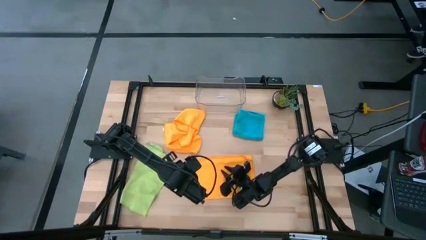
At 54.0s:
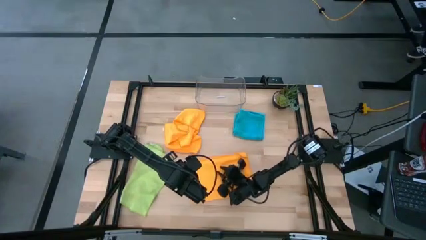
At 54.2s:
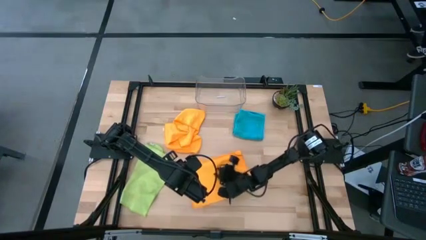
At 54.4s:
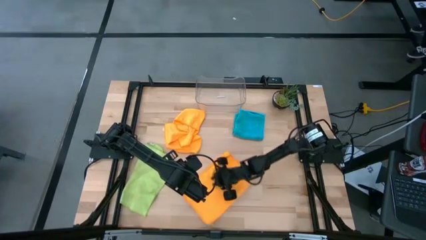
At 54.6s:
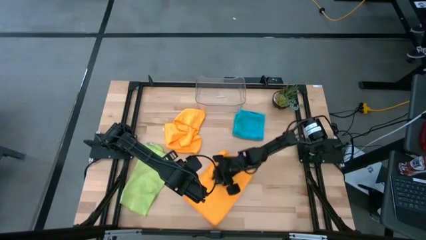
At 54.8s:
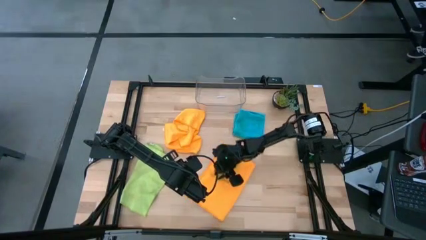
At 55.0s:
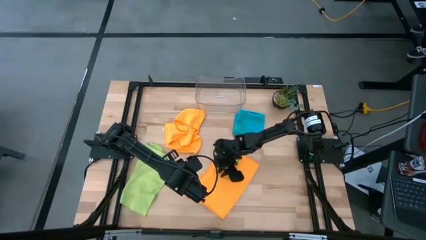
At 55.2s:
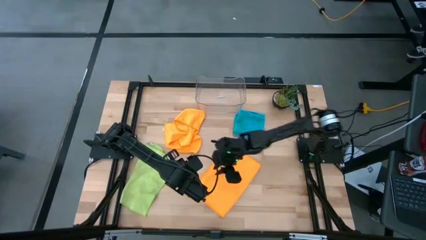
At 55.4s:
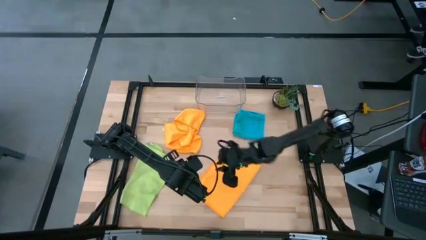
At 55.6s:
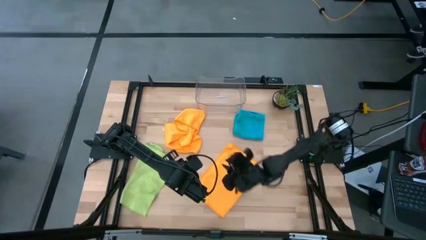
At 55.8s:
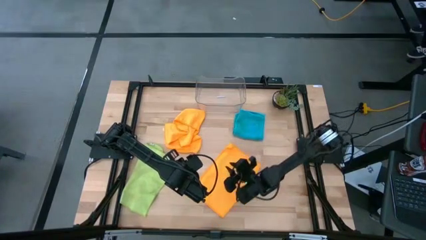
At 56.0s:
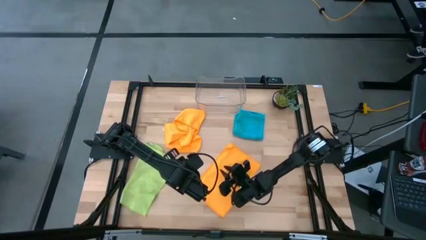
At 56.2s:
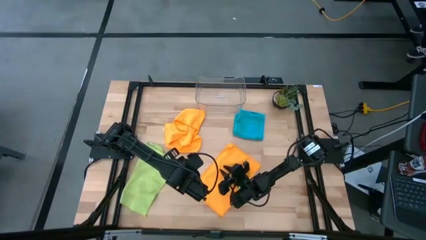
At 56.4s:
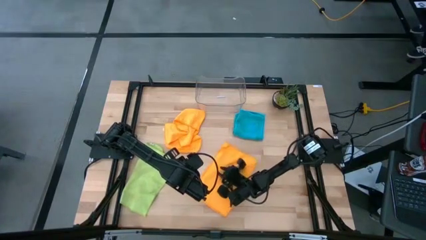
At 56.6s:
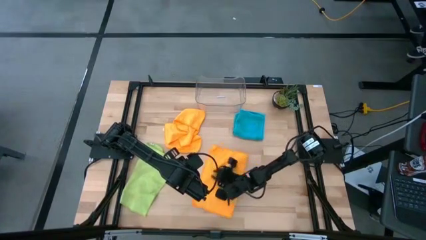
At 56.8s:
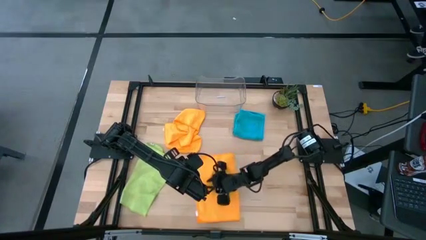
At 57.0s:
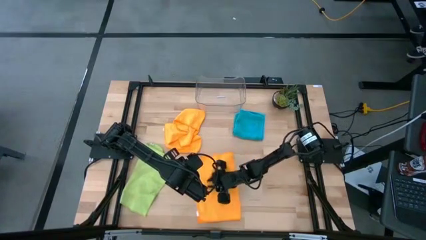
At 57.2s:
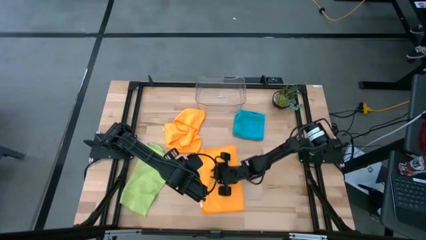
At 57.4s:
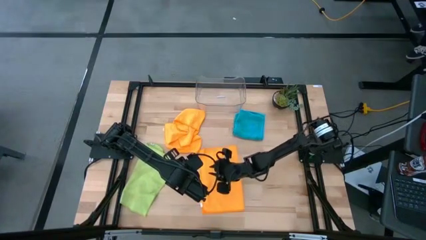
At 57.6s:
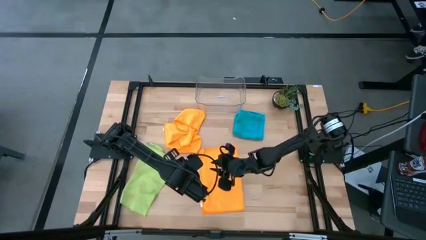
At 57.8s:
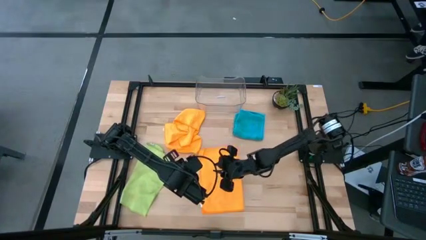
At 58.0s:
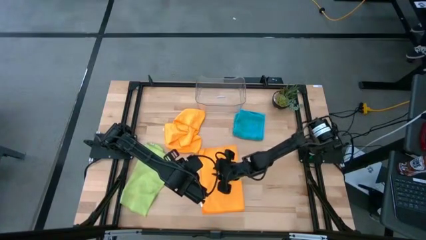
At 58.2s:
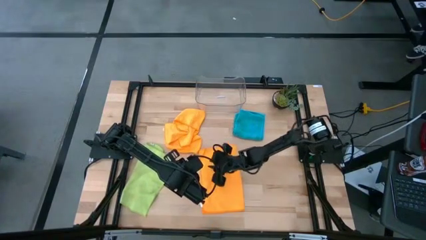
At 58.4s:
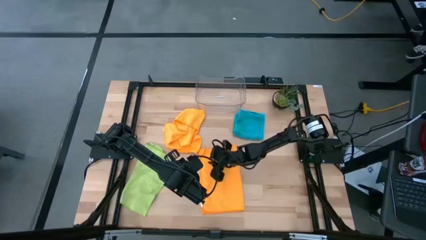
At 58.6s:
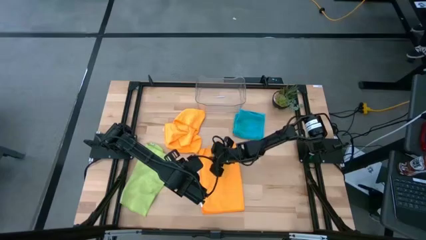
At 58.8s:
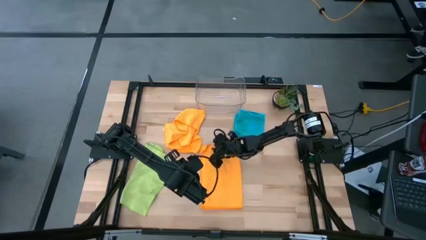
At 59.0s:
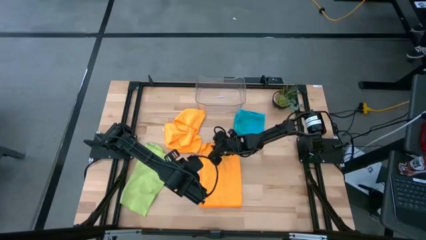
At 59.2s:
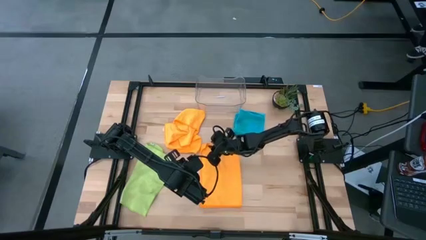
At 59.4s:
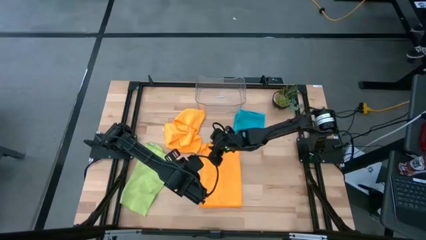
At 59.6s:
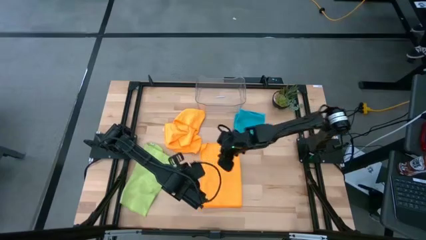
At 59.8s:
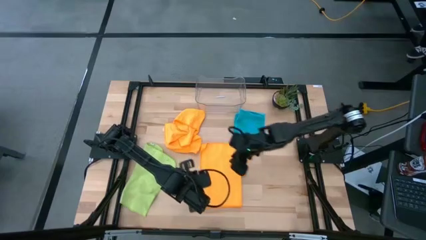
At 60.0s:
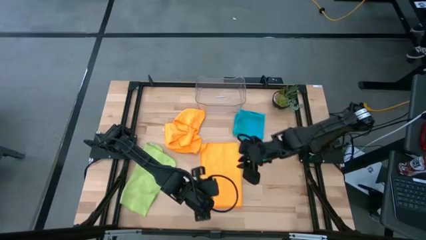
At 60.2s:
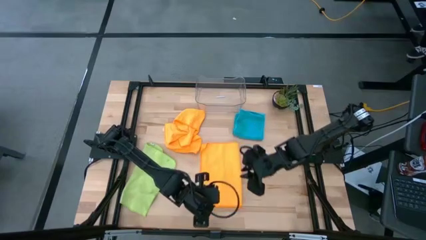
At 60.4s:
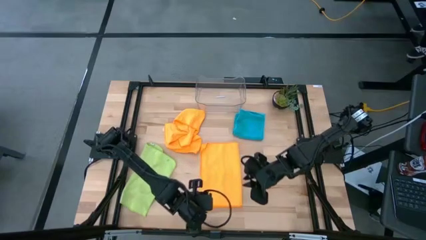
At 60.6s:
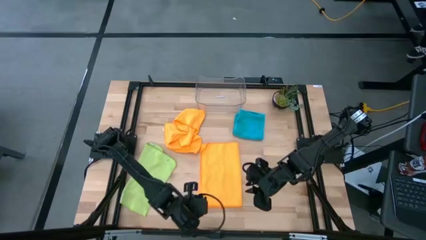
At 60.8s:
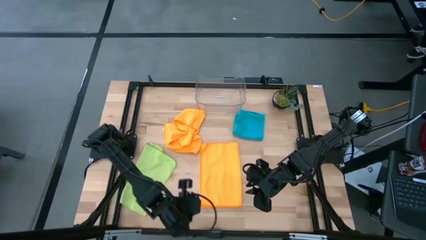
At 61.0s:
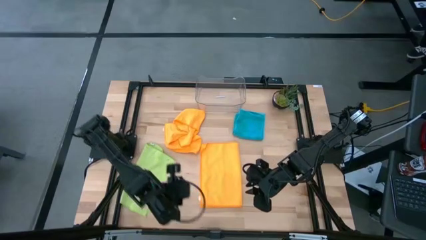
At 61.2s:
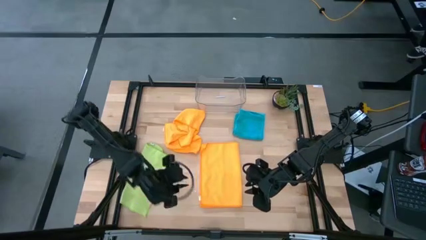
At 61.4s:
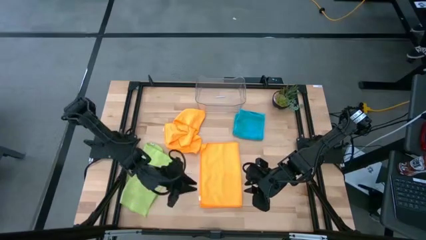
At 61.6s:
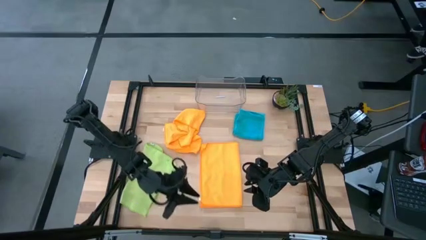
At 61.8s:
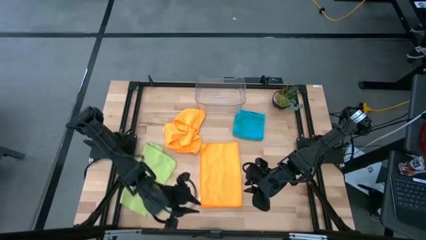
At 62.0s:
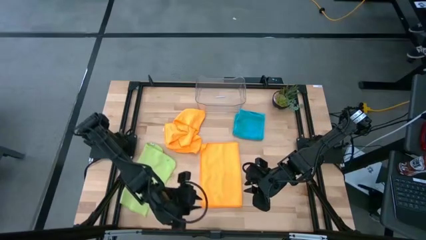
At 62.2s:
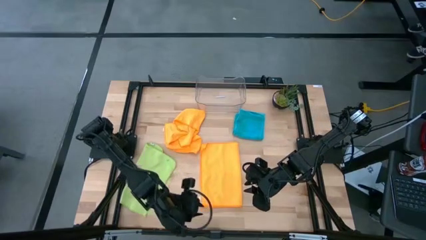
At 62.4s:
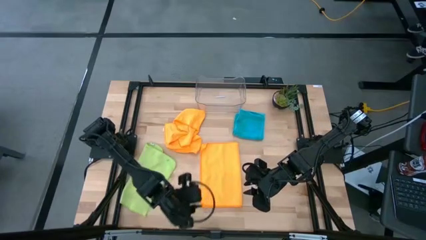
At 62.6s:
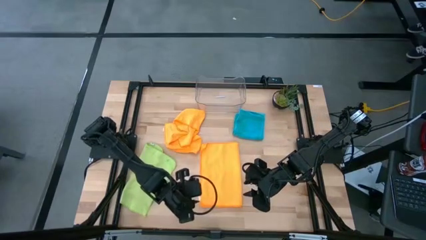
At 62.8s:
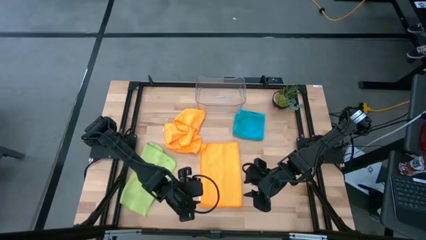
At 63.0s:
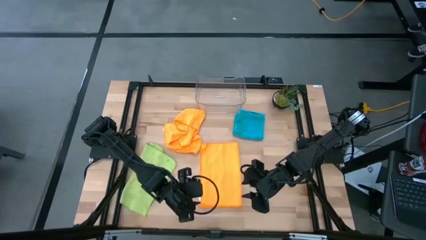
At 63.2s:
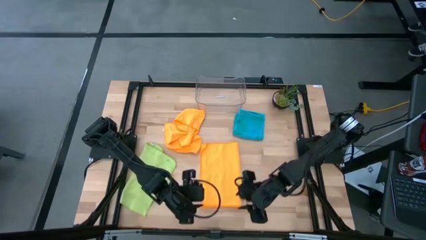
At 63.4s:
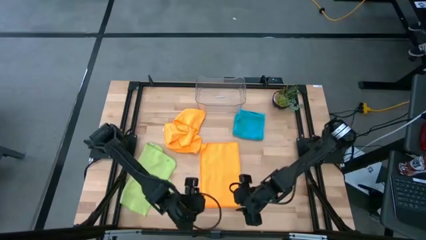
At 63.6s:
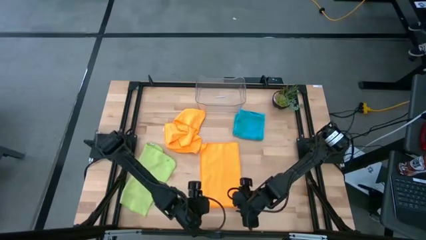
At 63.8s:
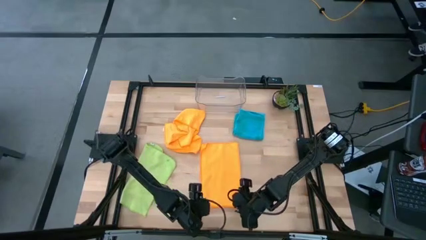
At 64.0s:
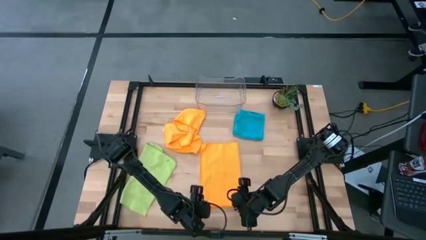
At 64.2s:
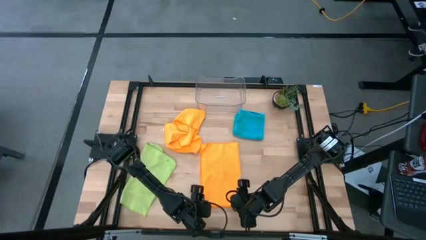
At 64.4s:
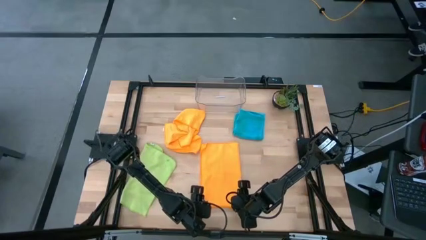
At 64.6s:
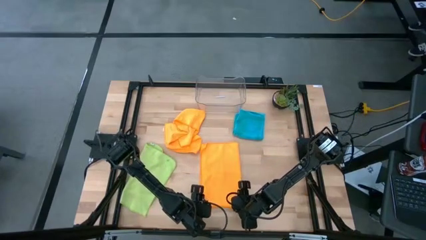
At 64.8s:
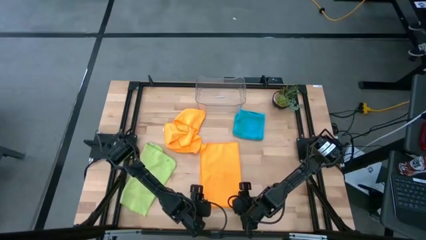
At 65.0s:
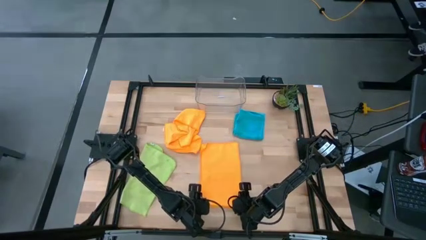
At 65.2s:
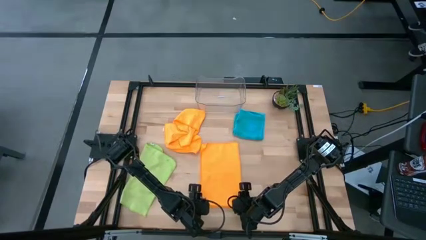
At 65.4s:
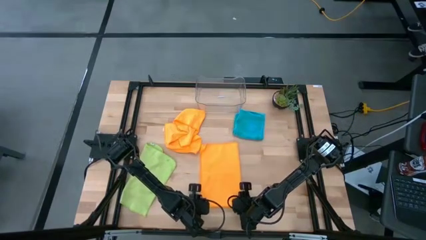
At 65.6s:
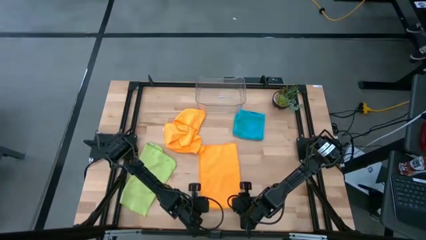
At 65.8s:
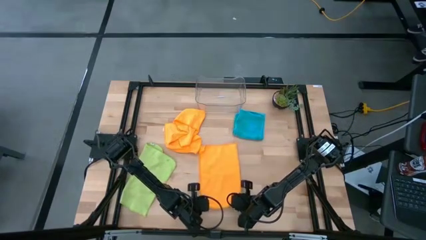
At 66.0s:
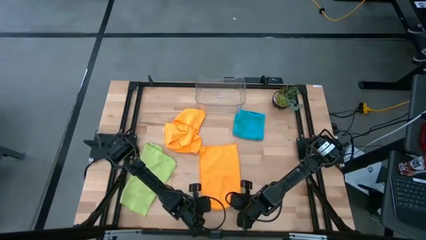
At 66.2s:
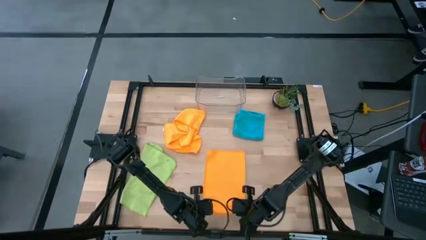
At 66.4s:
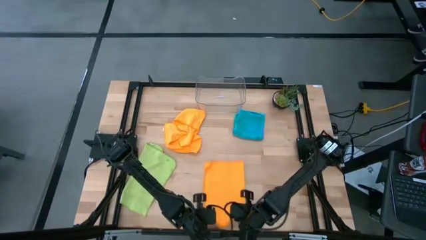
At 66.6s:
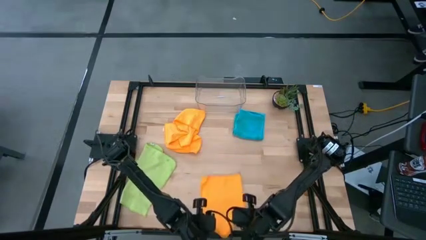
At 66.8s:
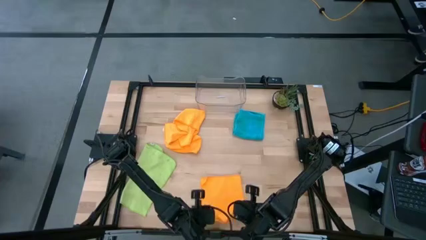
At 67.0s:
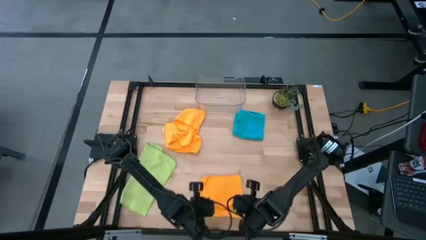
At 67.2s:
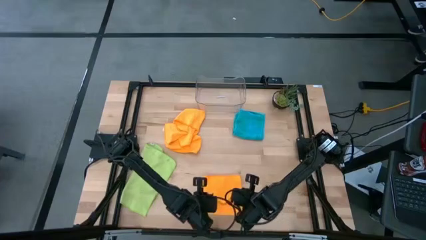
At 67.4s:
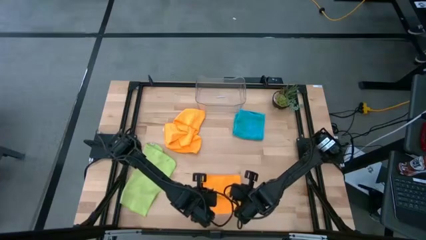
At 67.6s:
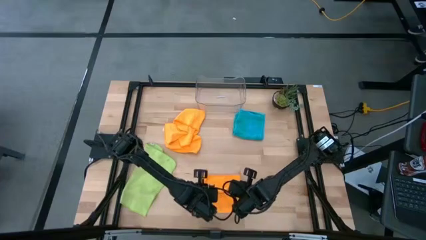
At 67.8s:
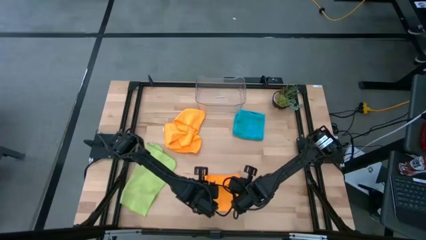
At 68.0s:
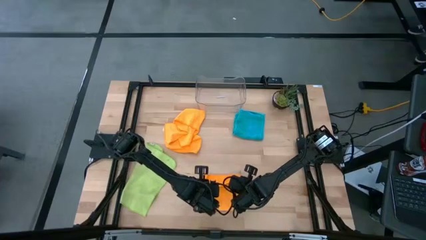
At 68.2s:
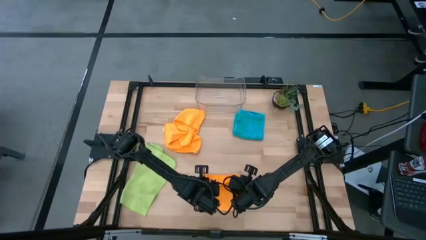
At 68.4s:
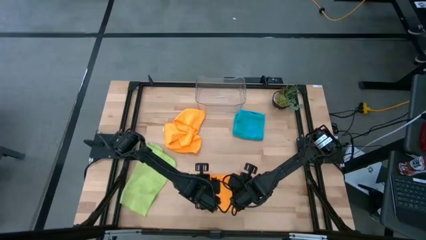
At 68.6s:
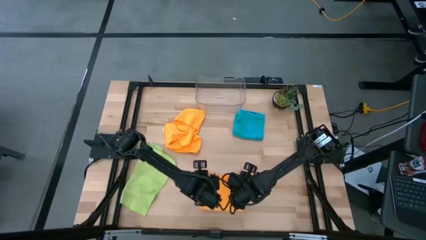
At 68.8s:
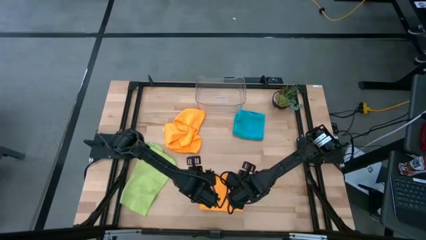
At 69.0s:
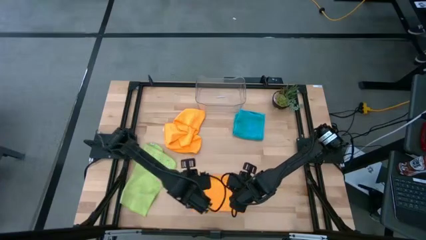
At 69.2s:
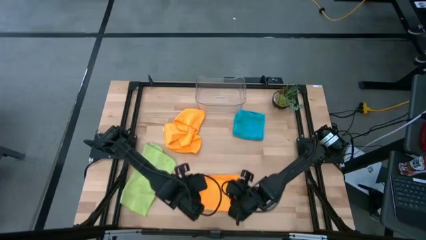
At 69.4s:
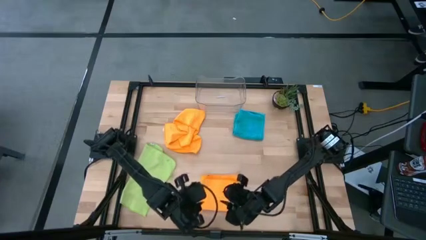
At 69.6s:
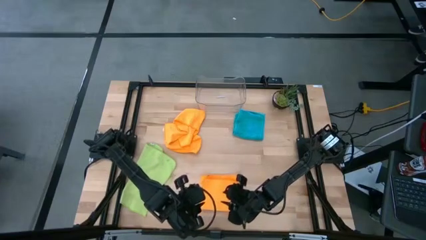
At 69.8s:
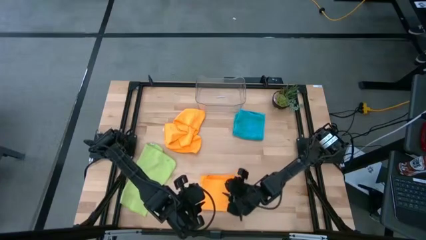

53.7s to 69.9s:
Task: Fold microfiber towels
Fold the bottom orange microfiber cloth
